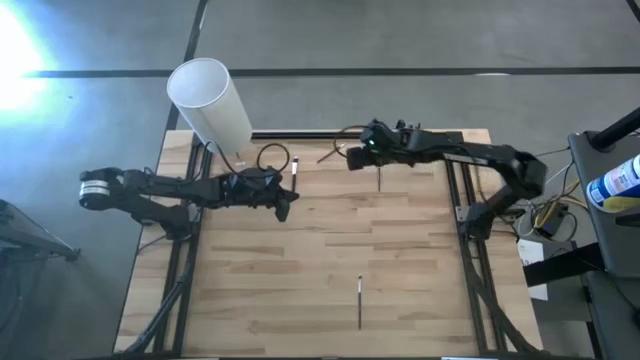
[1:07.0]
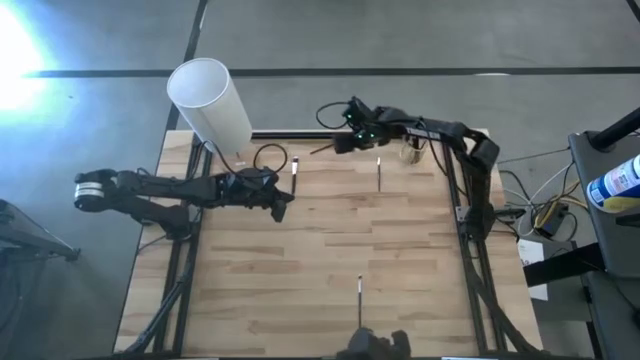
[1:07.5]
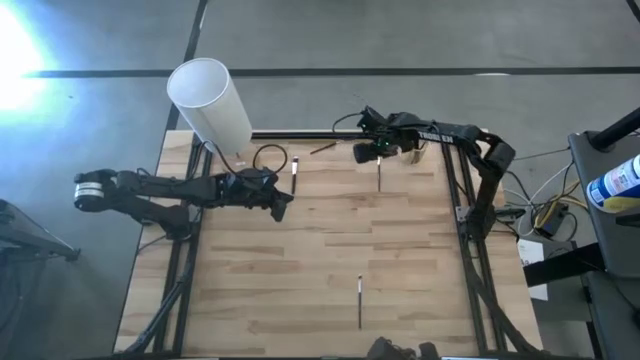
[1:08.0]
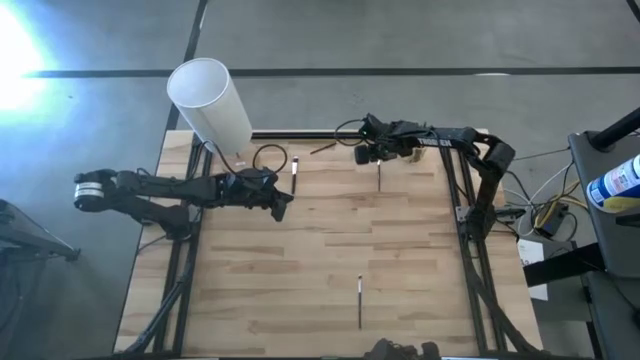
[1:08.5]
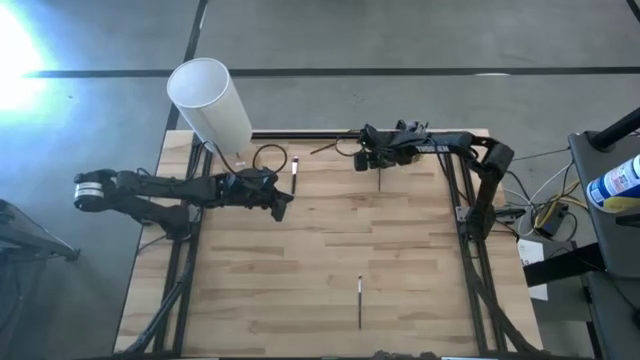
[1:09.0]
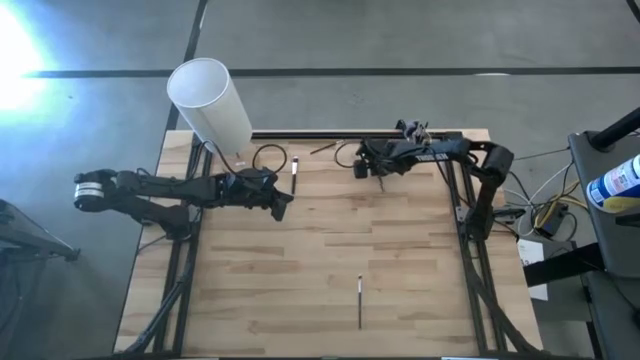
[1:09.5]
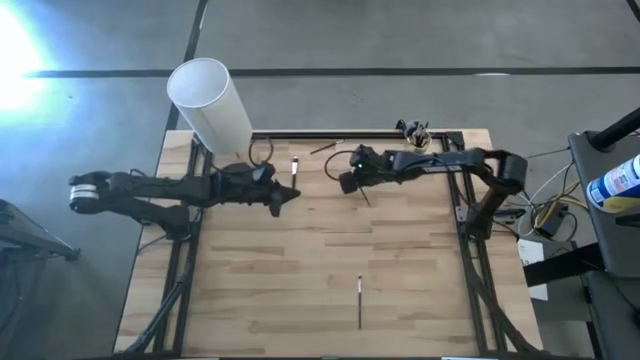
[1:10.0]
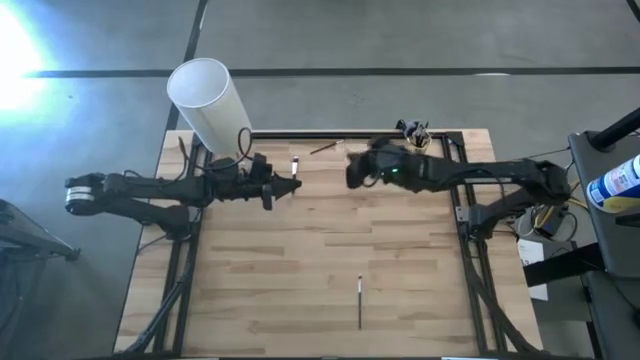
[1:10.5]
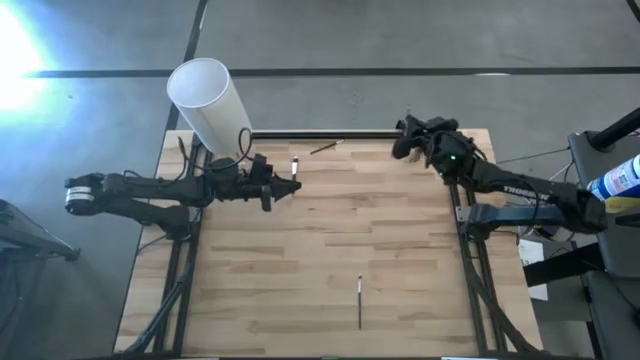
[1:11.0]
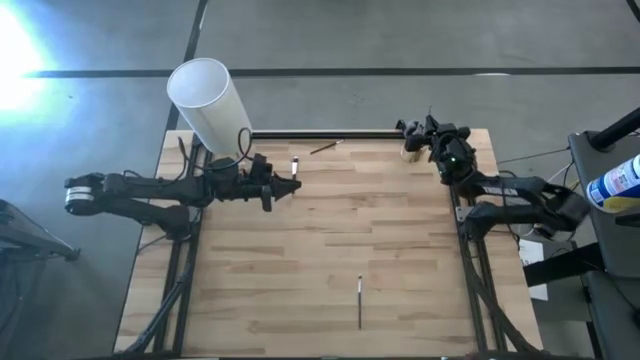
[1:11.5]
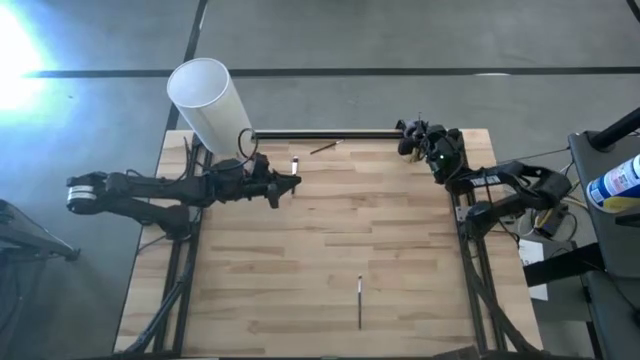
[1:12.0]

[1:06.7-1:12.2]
Task: Put items in baskets/containers
Put the eyeshadow brush into the yellow container

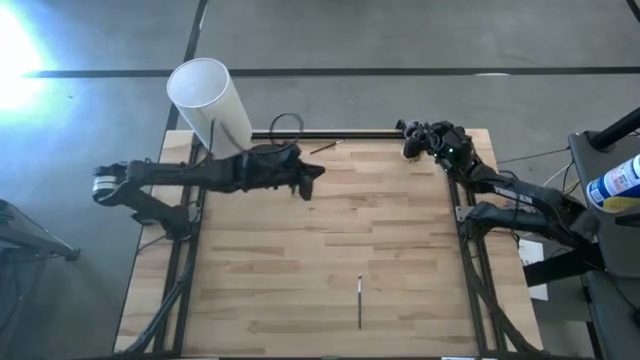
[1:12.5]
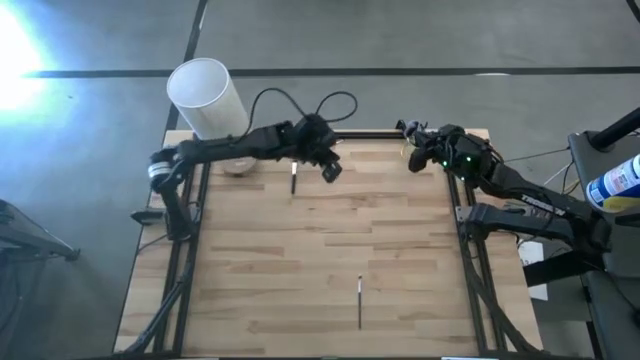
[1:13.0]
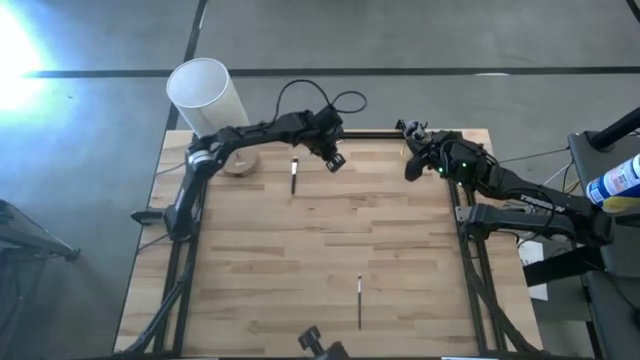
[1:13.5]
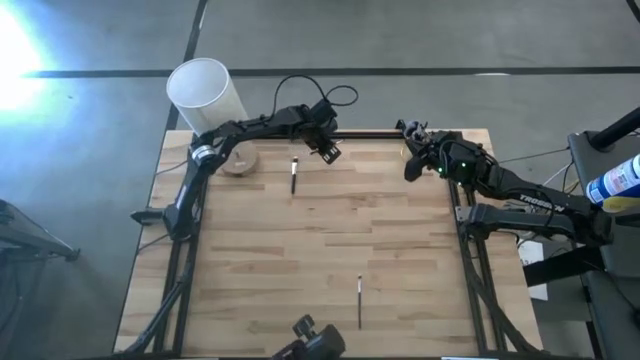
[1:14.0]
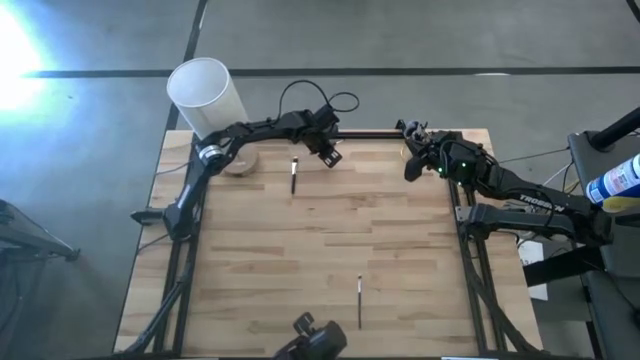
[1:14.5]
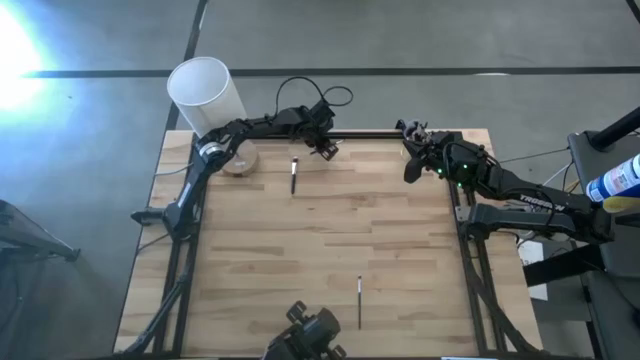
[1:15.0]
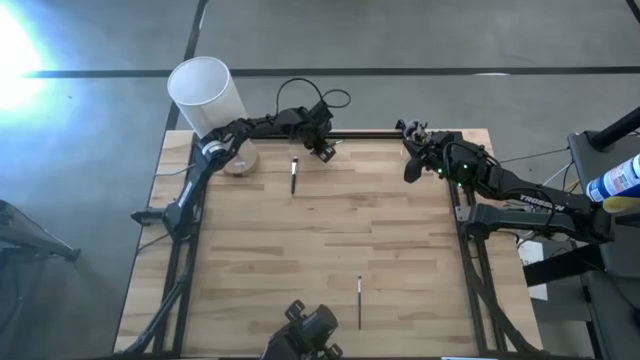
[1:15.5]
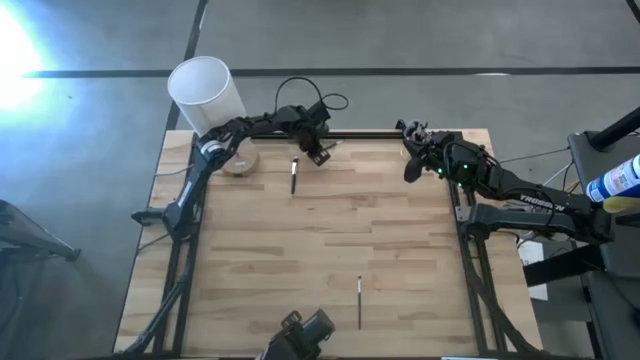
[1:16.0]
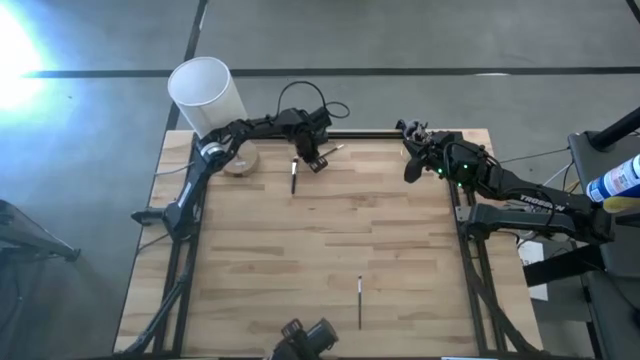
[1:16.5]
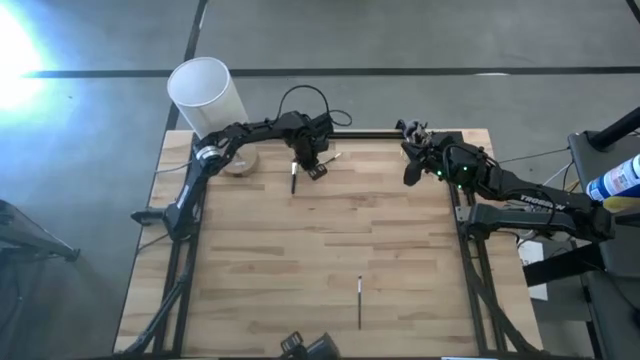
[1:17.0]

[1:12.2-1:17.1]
Put the eyeshadow brush into the yellow container

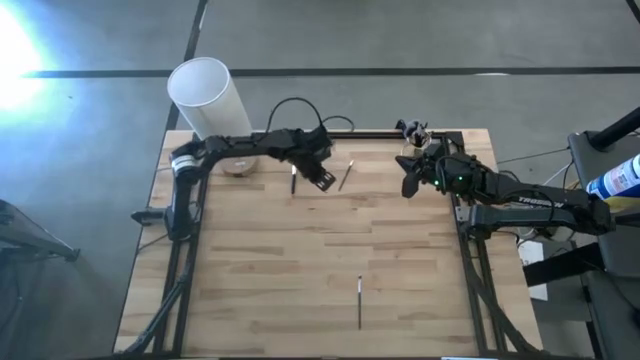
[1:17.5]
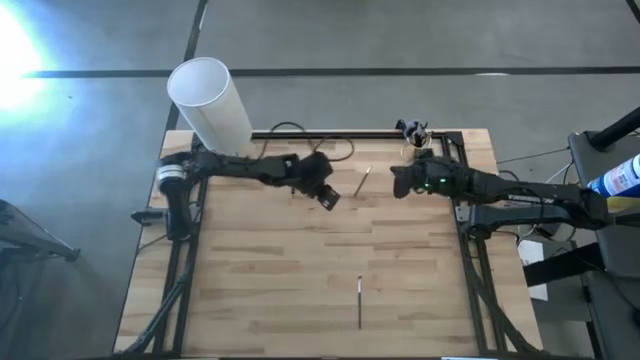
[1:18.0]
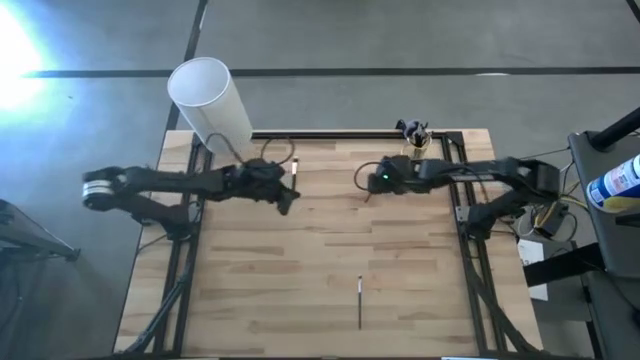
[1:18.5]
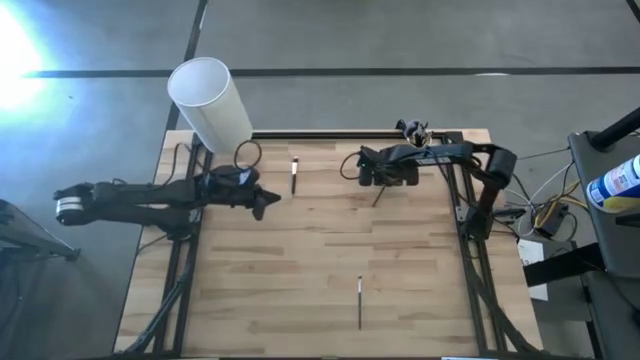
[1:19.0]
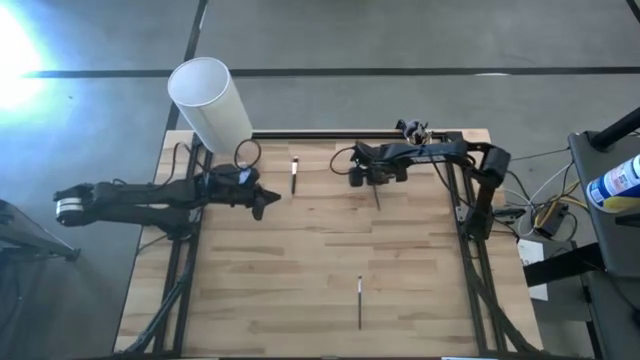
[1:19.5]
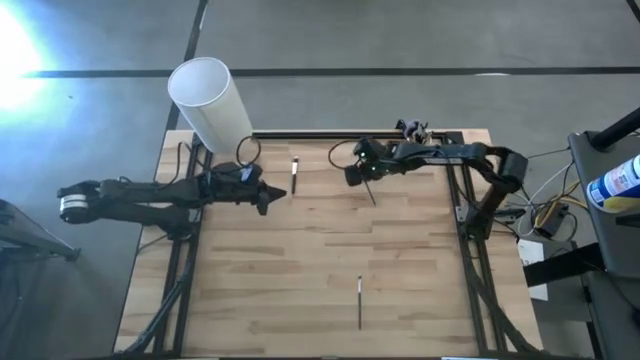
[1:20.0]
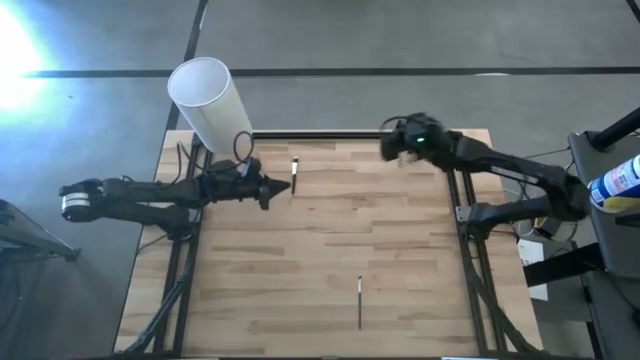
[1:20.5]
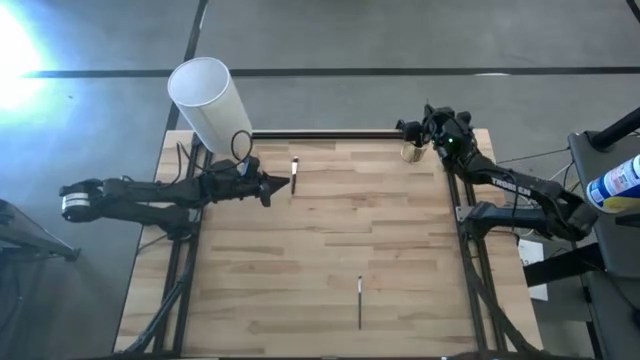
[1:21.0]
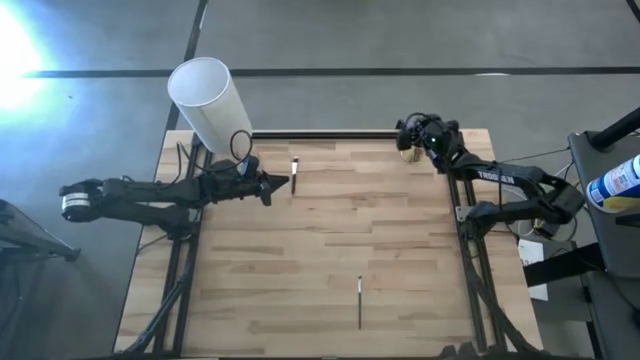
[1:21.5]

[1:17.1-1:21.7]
Put the eyeshadow brush into the yellow container

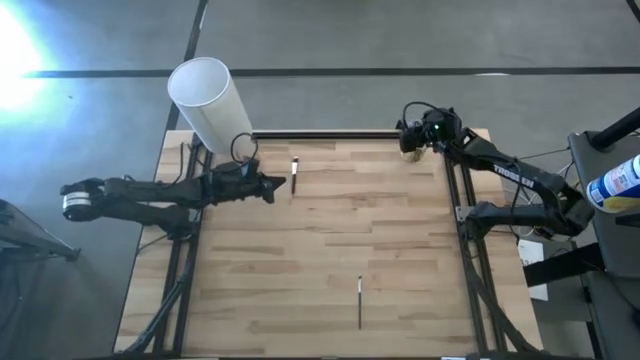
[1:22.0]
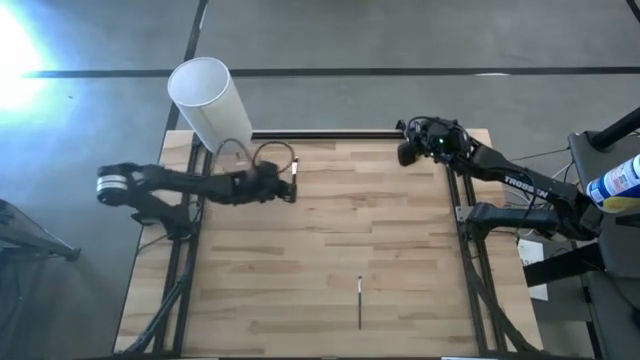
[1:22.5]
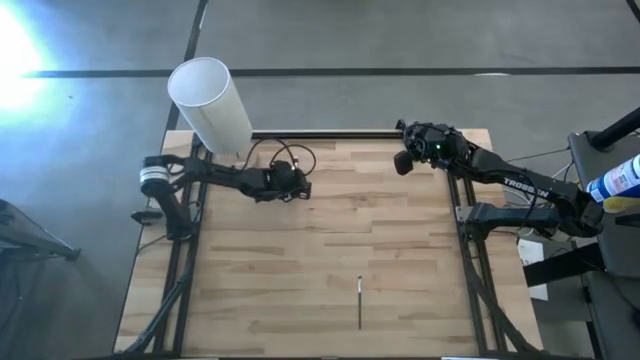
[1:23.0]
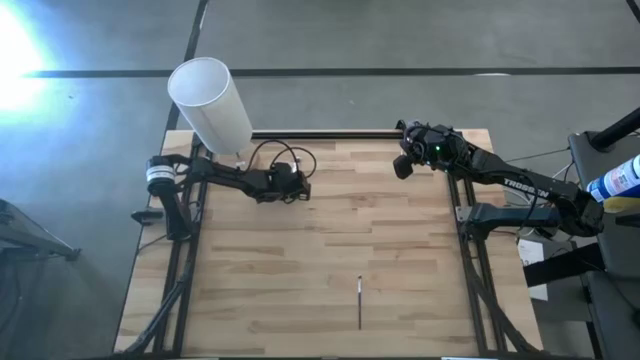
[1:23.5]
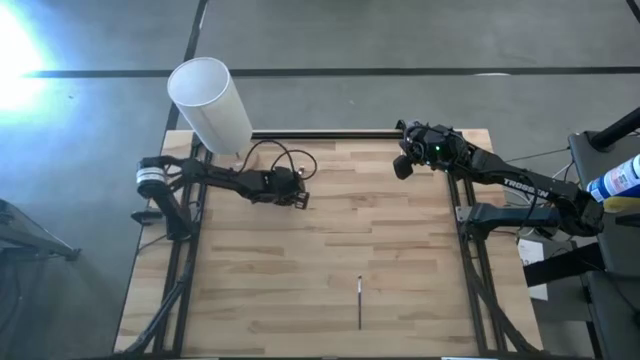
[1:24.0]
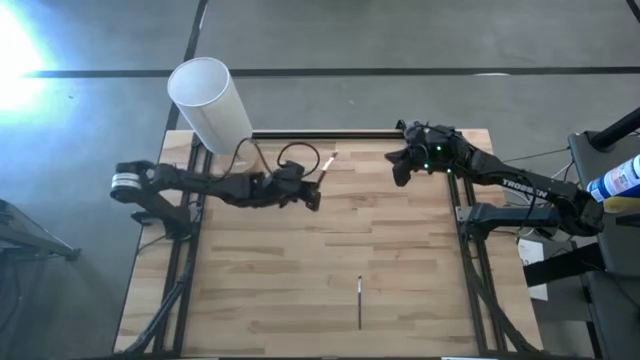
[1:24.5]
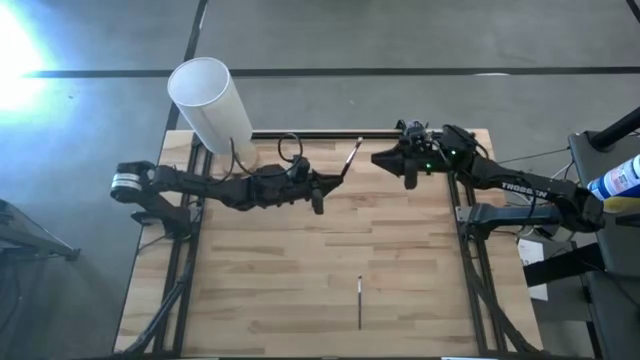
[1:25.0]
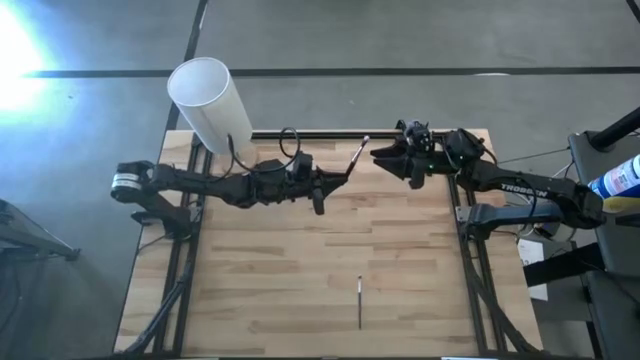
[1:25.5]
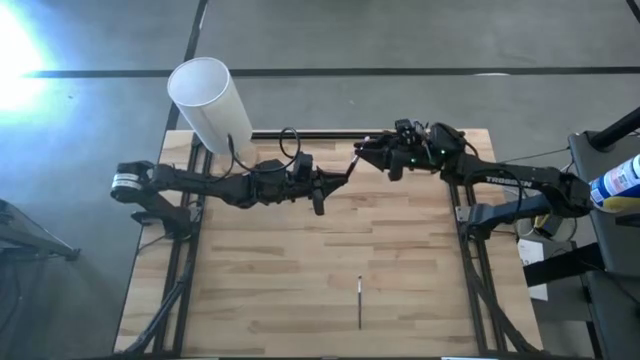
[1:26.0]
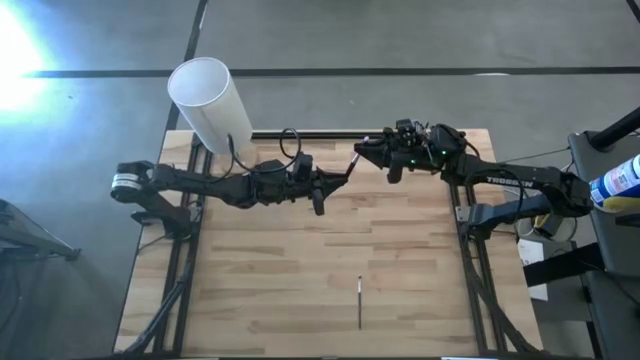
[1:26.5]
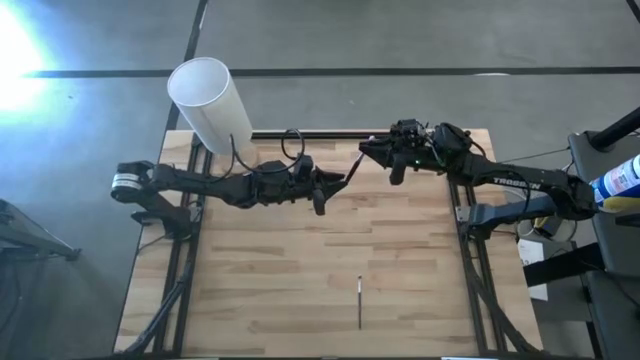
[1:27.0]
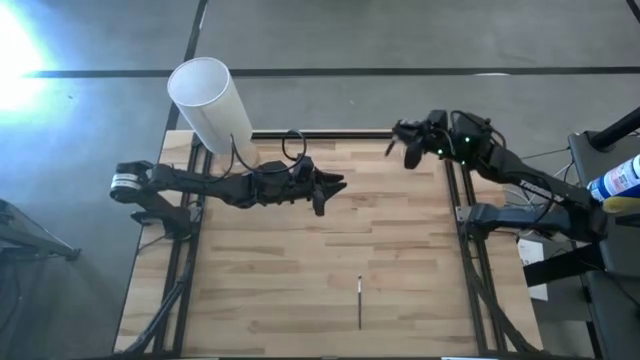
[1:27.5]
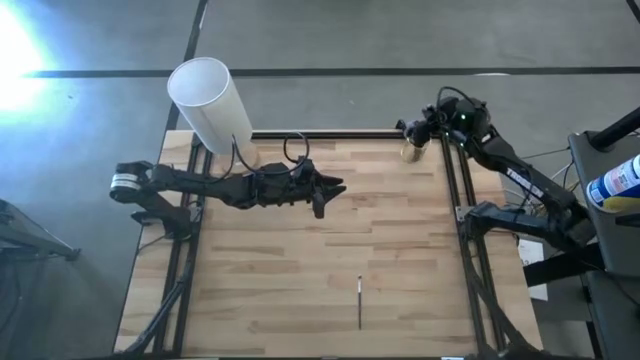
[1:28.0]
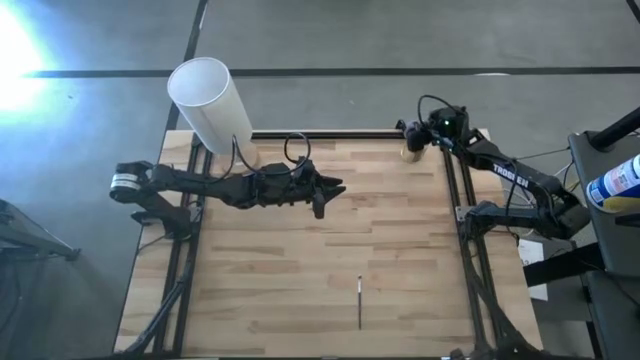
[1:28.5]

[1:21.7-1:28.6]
Put the eyeshadow brush into the yellow container
